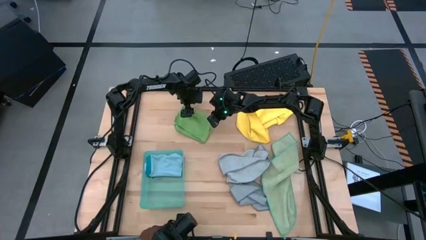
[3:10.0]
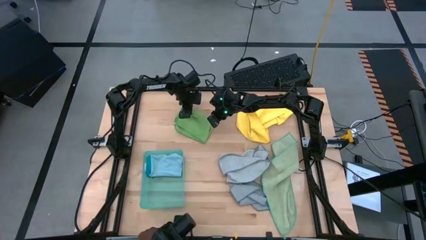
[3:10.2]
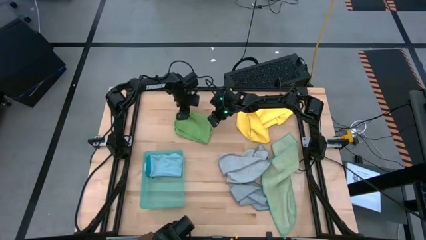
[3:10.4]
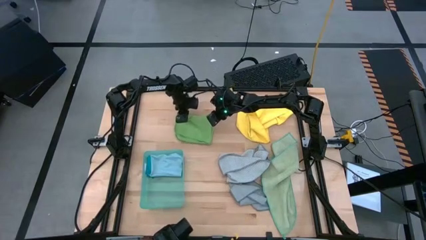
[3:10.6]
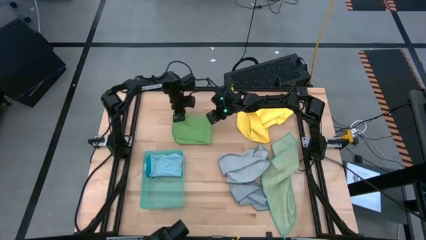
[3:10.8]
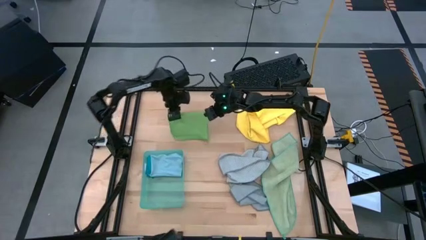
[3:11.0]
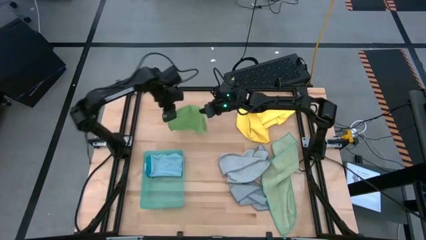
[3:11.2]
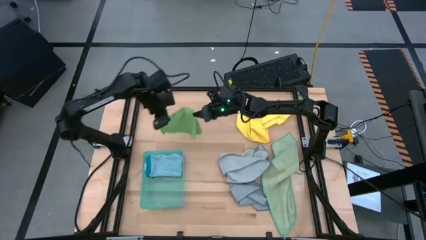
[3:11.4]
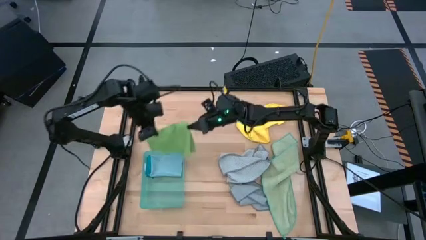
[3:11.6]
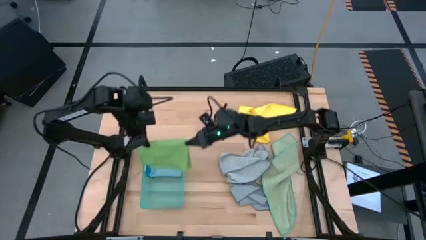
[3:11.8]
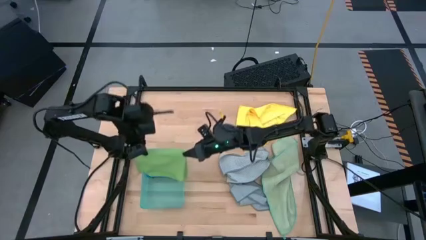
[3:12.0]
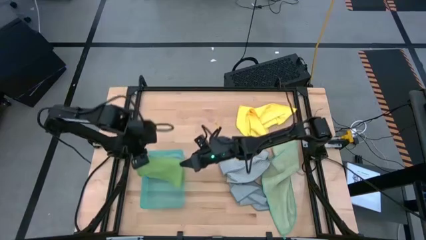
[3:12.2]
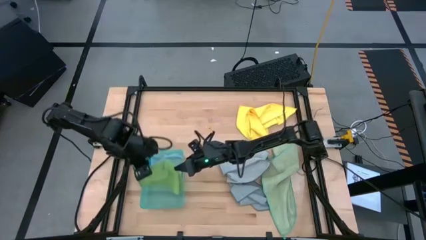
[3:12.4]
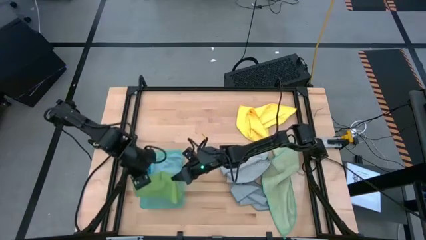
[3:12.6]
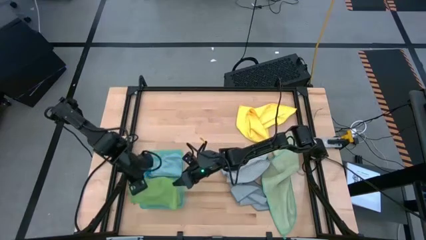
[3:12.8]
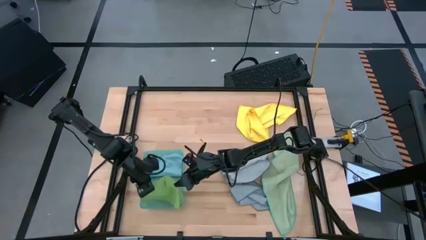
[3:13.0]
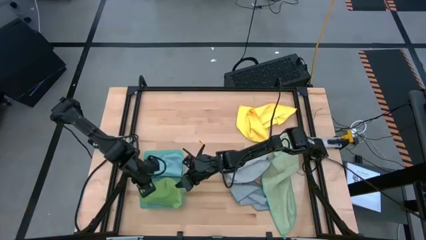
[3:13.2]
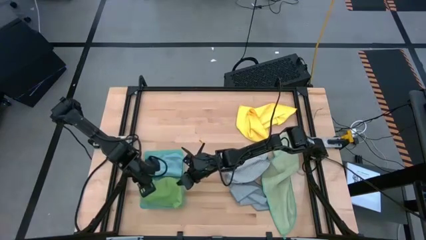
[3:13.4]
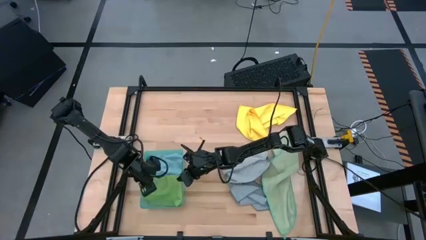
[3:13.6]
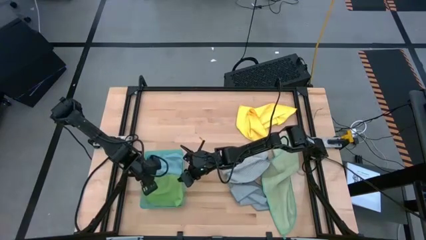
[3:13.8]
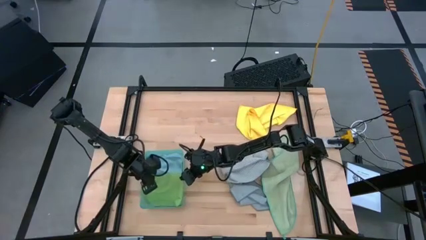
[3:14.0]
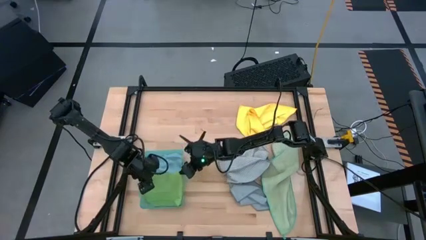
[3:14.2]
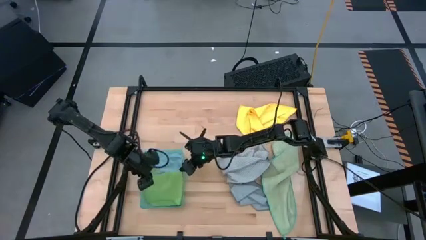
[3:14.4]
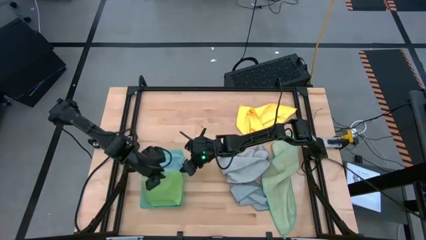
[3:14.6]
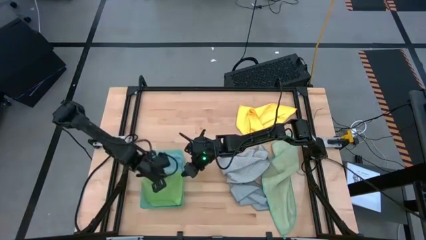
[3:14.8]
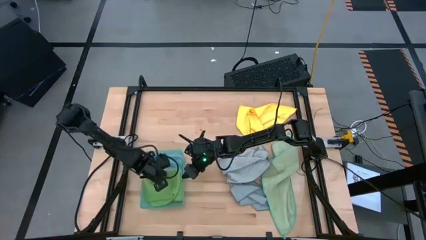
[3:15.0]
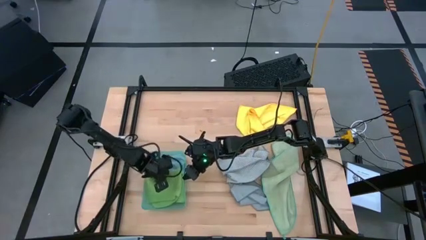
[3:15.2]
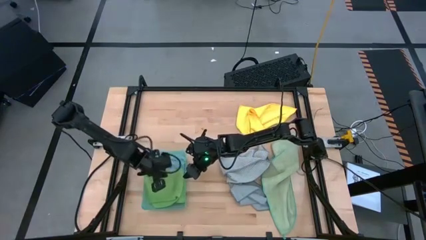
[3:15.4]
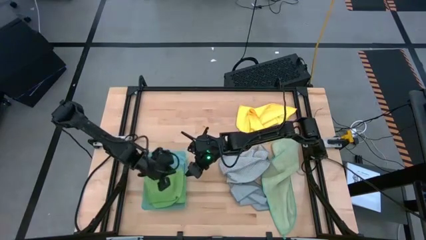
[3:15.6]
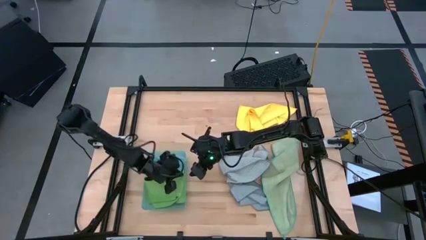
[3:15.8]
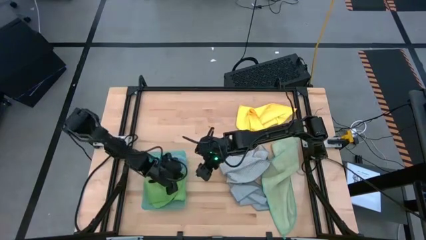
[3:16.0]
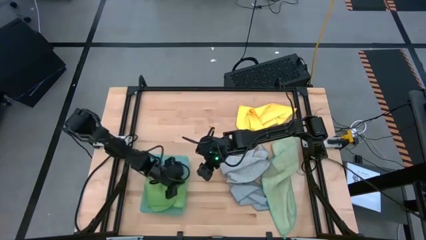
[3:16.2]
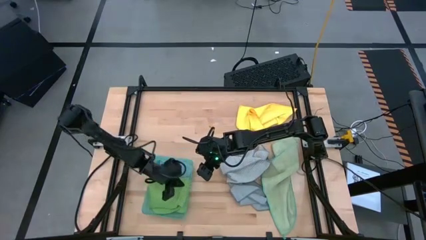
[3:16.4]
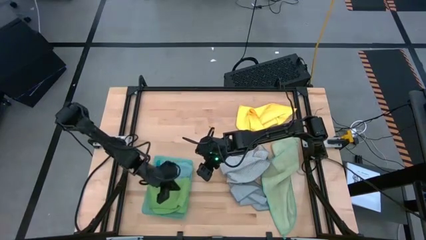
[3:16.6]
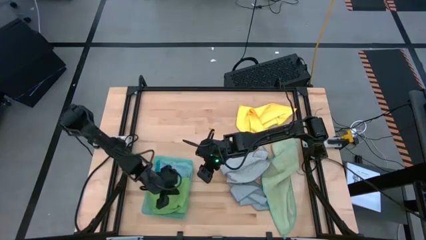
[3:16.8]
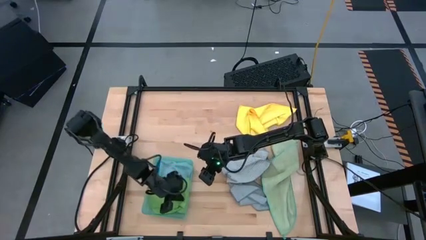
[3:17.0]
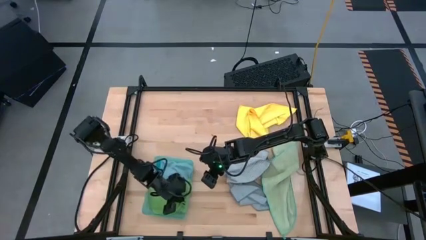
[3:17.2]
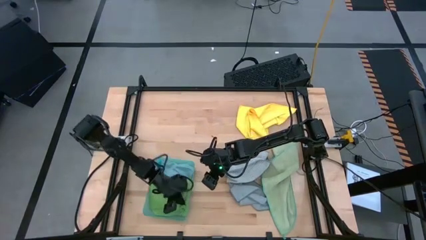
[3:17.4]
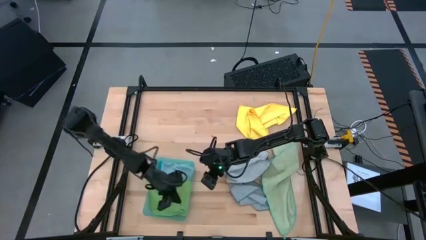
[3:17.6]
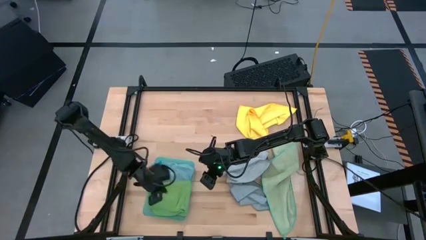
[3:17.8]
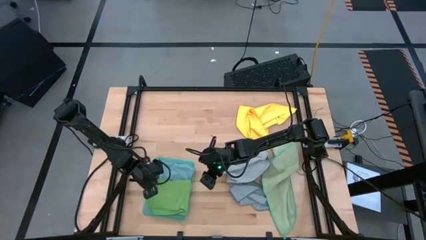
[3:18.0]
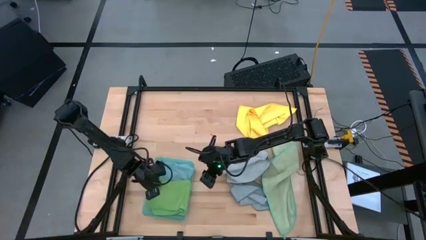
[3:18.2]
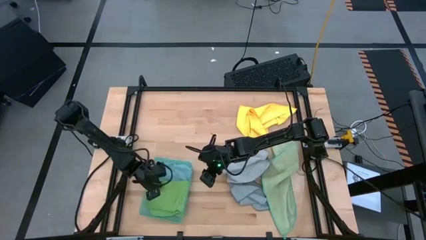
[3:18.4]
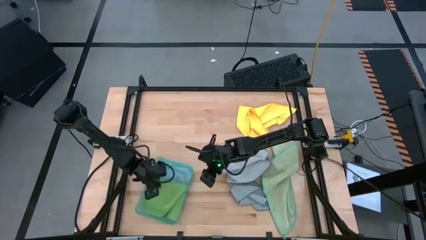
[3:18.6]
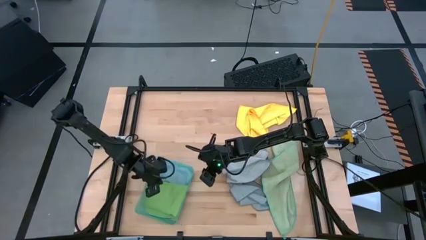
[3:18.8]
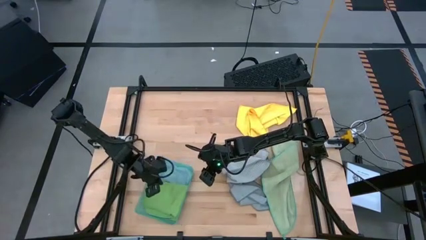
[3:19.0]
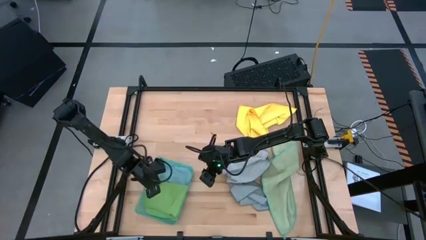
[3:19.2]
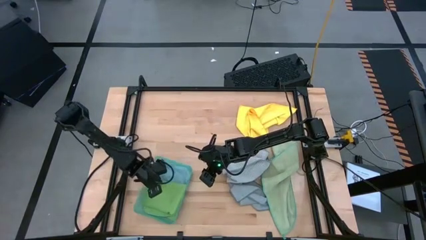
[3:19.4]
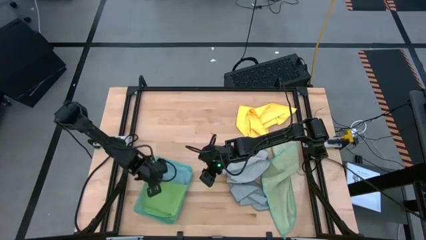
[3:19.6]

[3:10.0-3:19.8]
Task: Fold microfiber towels
Put the green microfiber cloth into the green bin

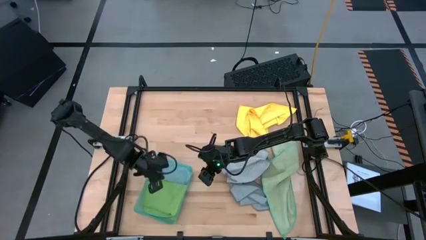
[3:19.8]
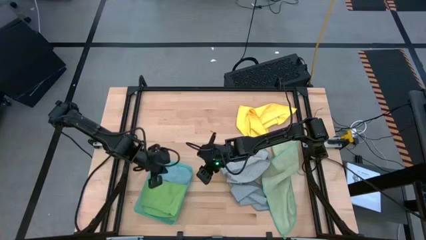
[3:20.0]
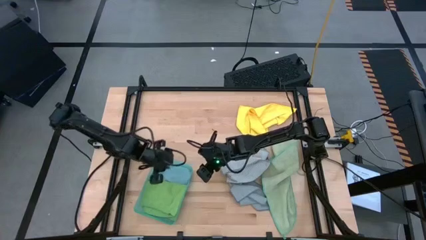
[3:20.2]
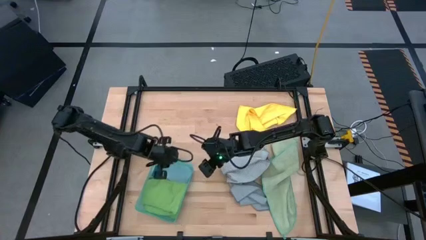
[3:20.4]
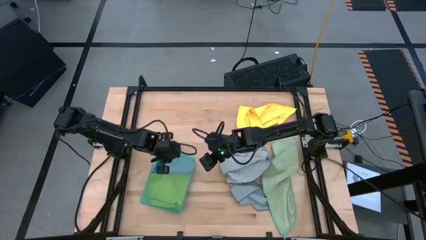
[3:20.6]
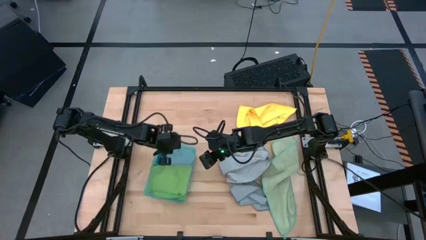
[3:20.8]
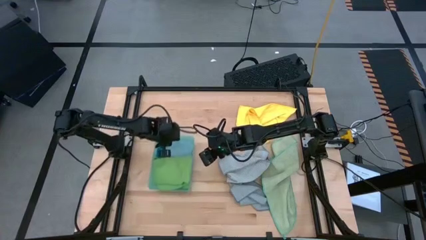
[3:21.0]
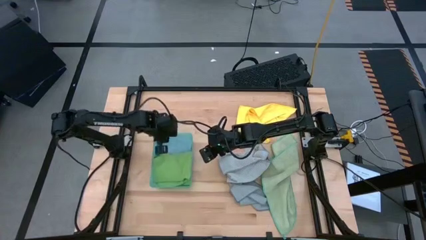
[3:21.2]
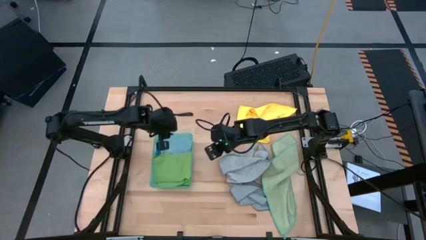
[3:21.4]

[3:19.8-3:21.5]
Adjust the green bin

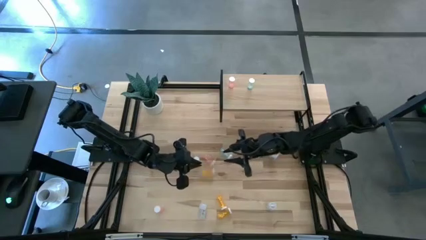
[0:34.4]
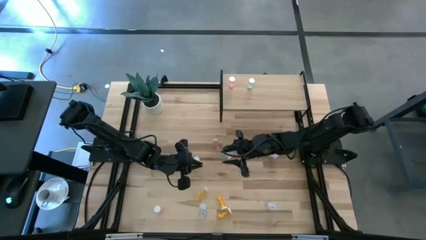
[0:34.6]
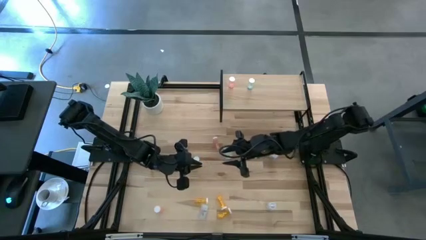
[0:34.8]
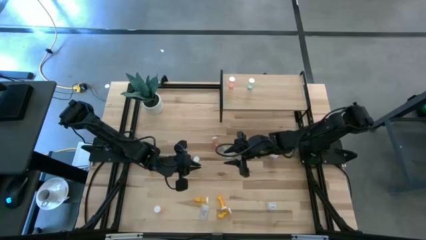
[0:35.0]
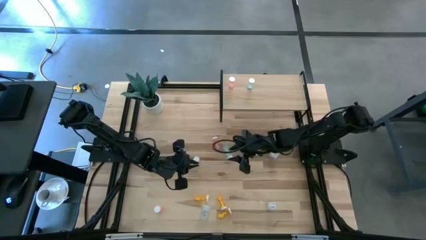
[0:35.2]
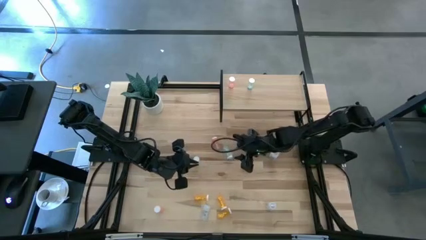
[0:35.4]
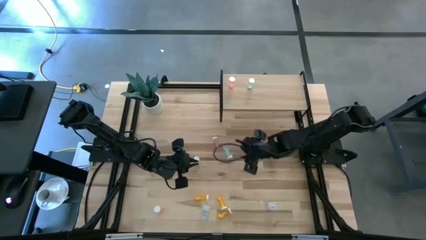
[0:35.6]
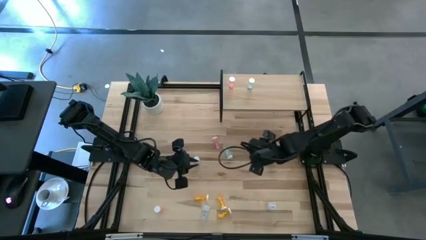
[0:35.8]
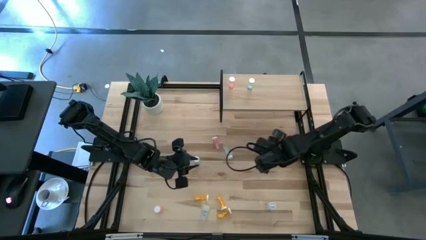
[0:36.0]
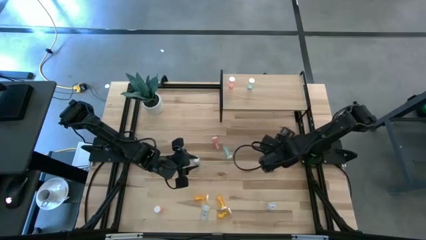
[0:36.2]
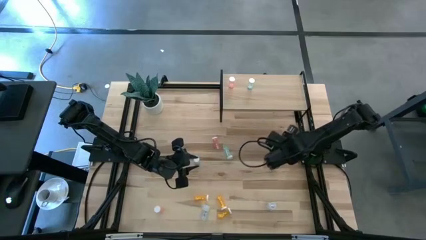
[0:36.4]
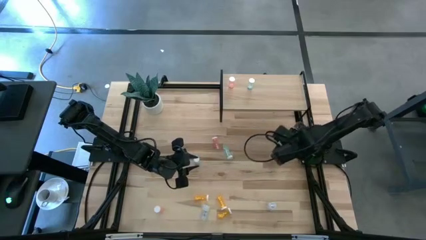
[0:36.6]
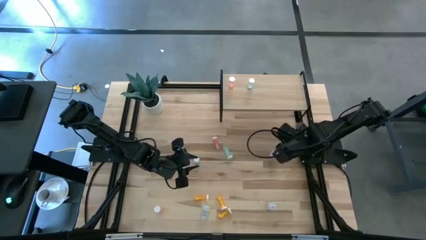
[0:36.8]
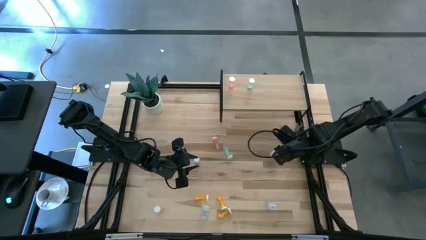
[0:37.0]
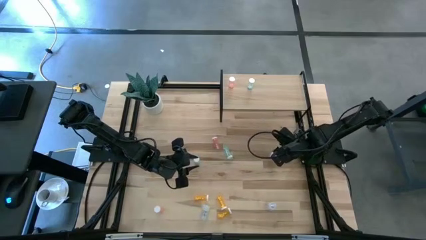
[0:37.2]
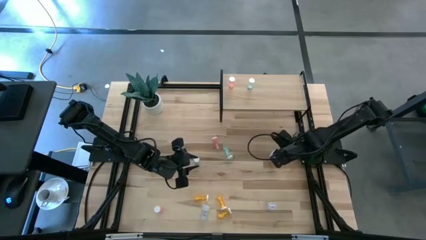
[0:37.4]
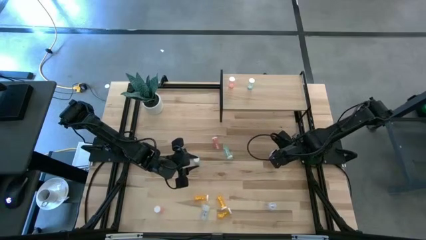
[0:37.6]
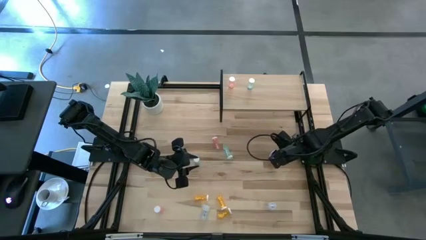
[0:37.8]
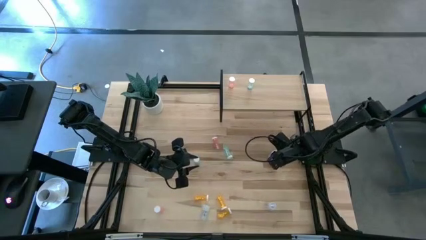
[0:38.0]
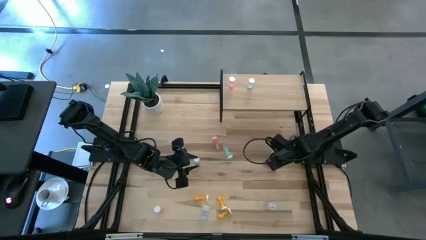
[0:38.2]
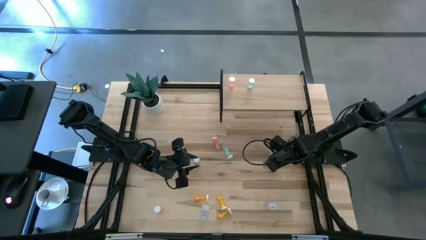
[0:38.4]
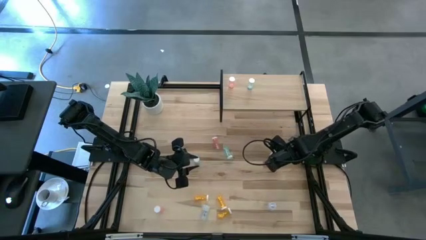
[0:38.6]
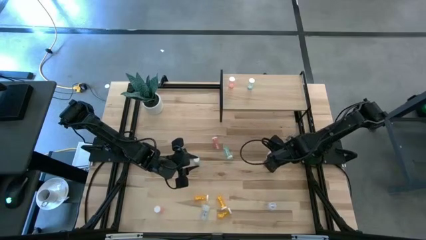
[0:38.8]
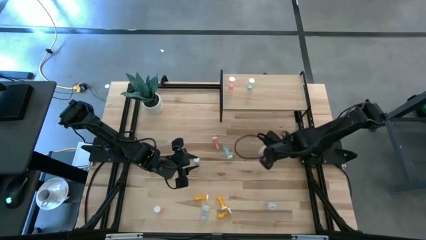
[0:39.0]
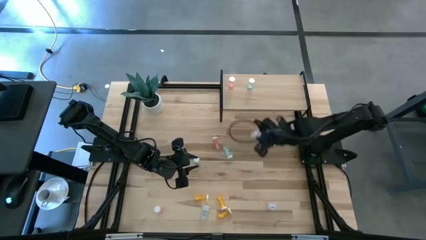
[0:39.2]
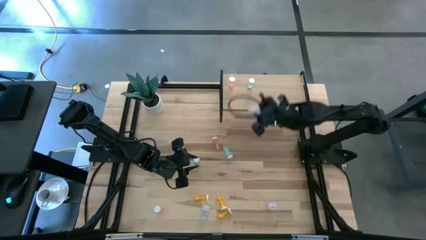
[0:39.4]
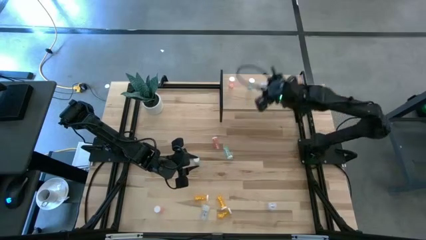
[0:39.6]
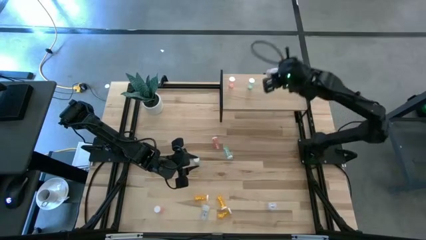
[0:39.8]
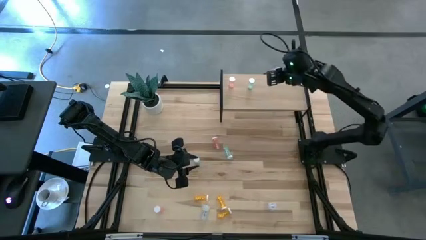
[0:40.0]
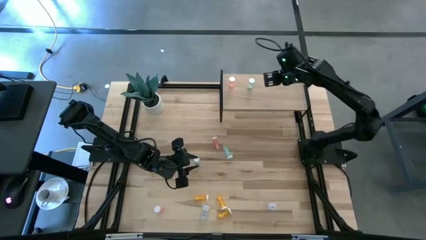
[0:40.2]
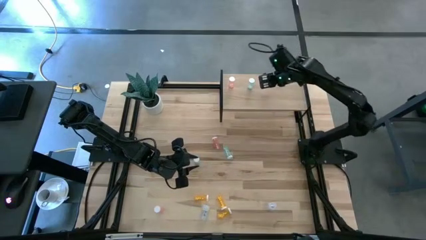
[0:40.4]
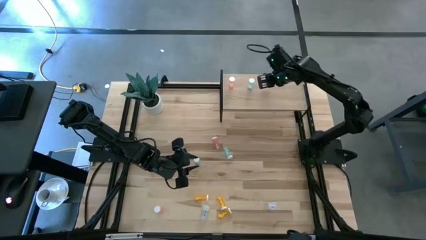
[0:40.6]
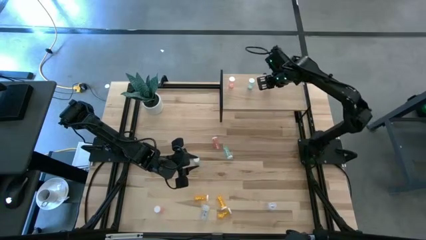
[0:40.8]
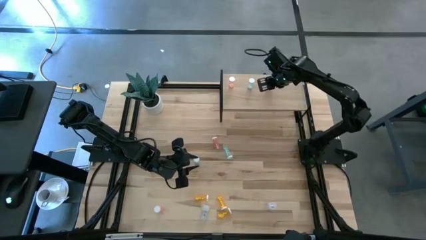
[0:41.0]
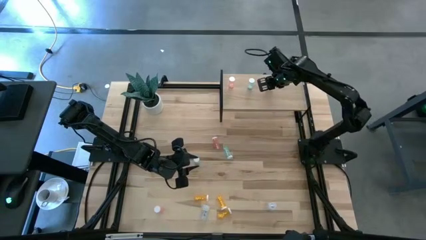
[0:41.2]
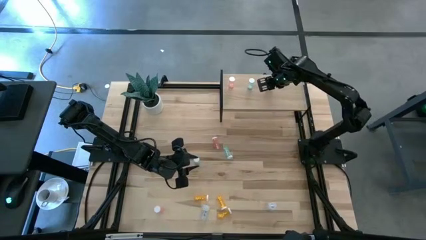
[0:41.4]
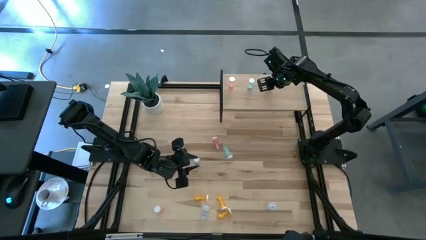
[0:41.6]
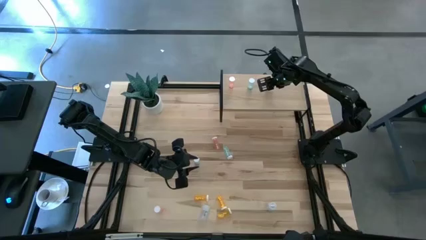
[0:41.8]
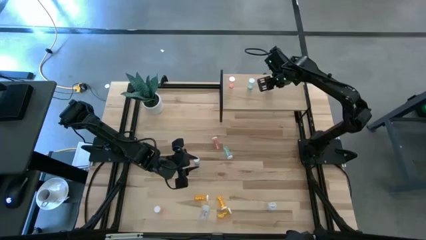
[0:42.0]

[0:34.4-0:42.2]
Task: Pick and place medicine bottles onto shelf by color
Put the top transparent pill bottle on the shelf
